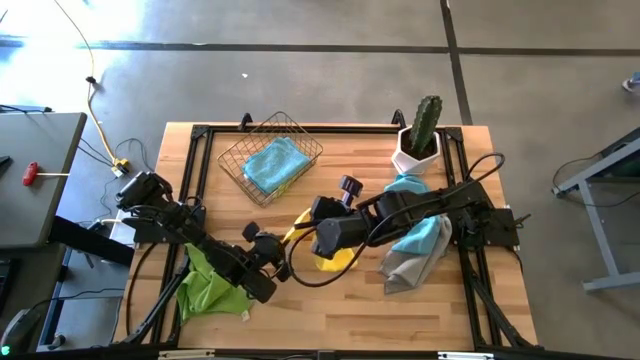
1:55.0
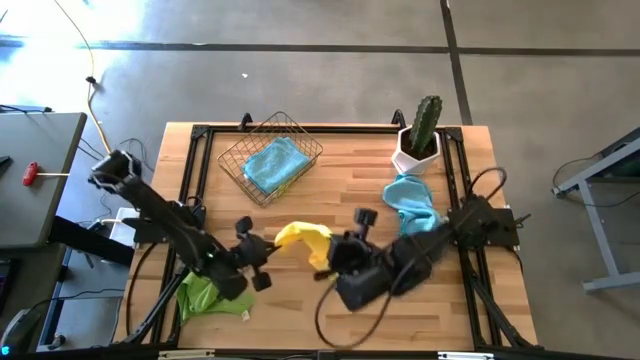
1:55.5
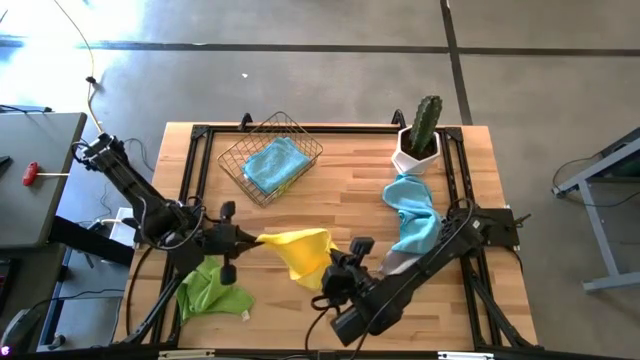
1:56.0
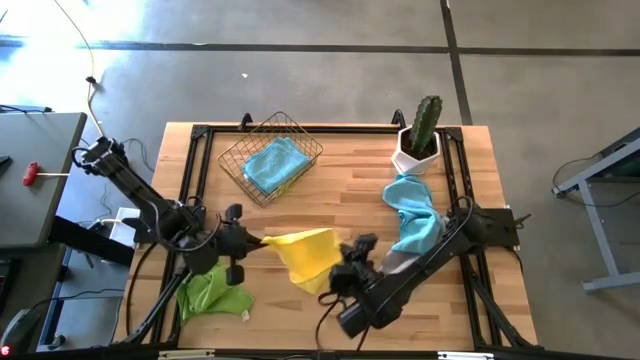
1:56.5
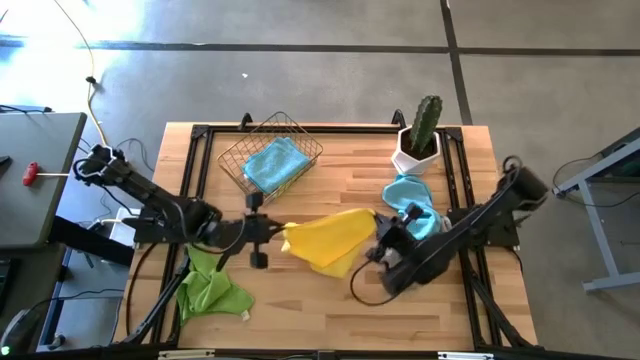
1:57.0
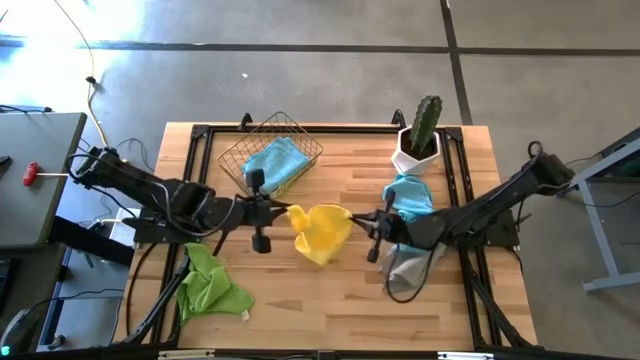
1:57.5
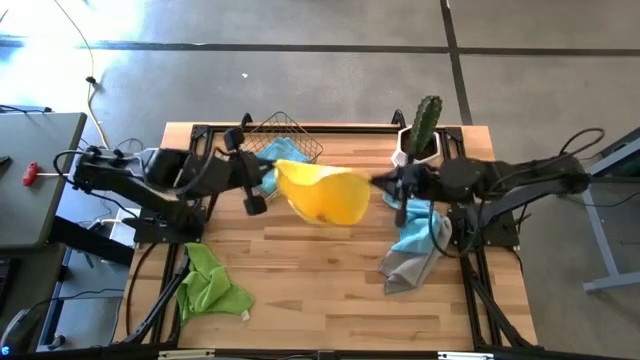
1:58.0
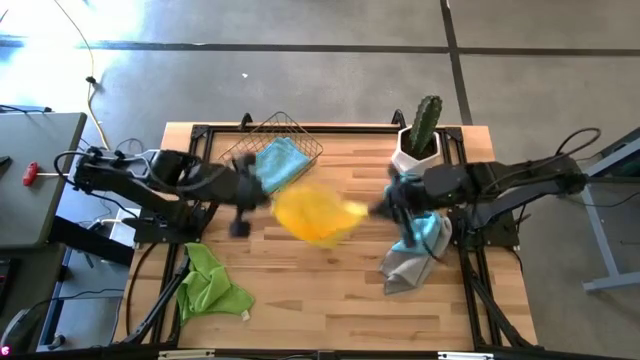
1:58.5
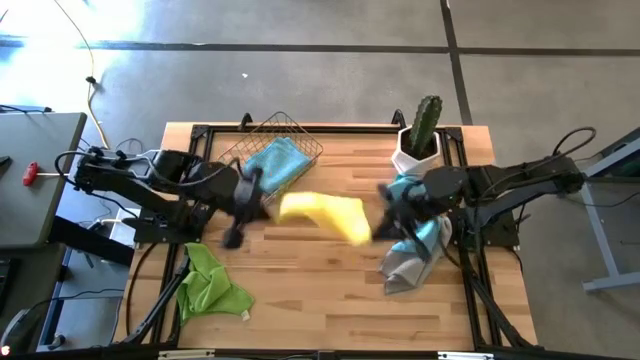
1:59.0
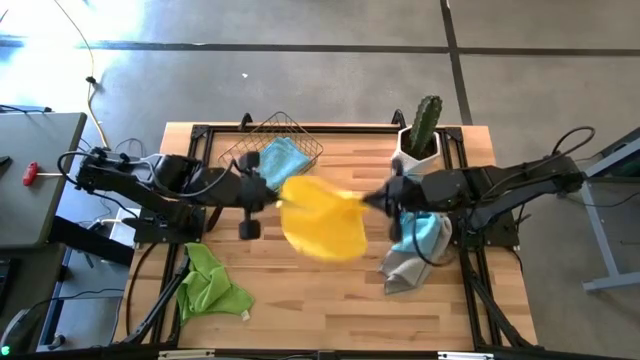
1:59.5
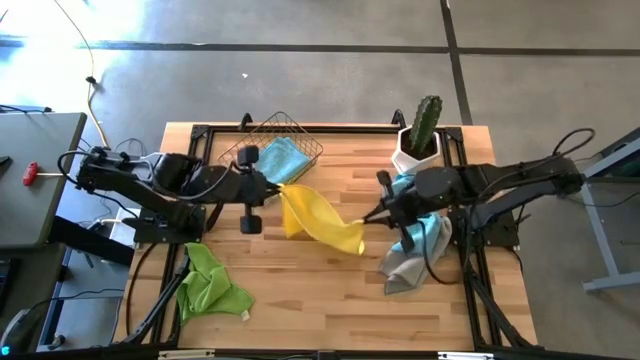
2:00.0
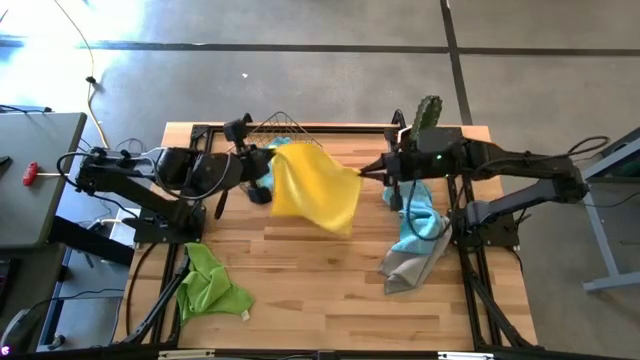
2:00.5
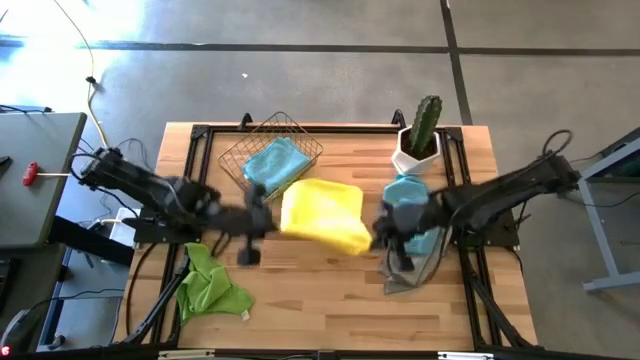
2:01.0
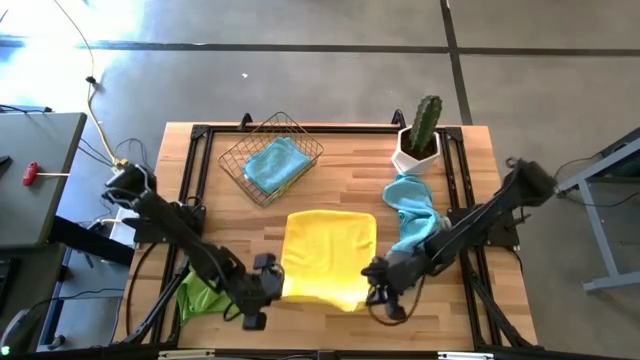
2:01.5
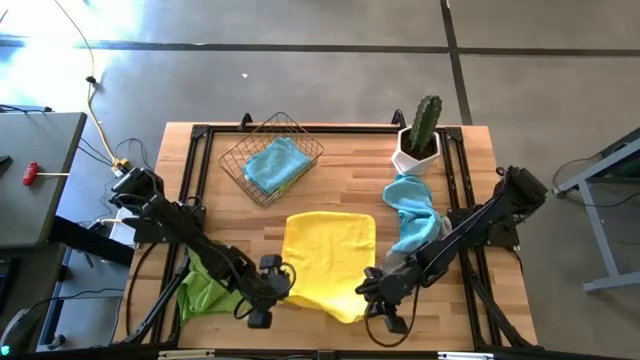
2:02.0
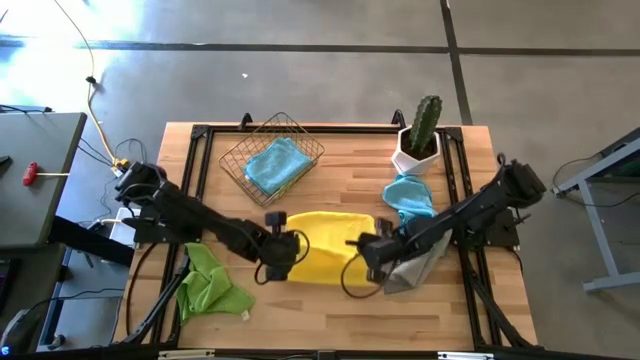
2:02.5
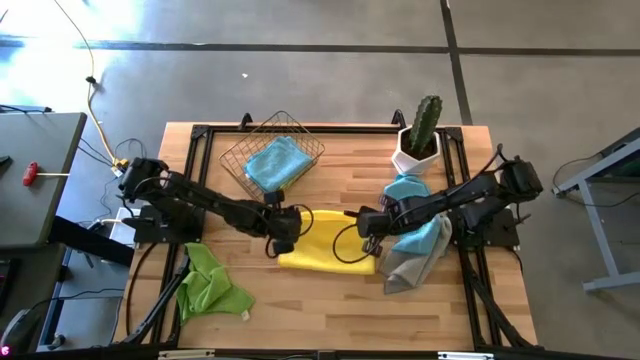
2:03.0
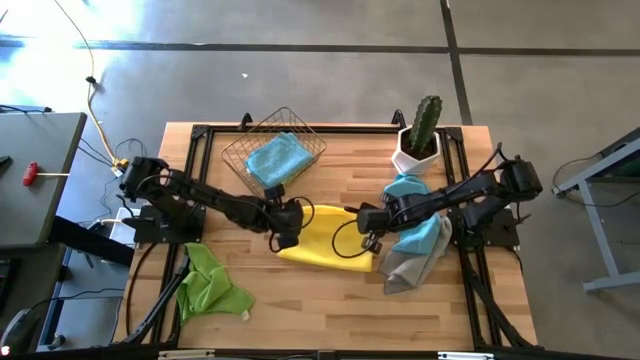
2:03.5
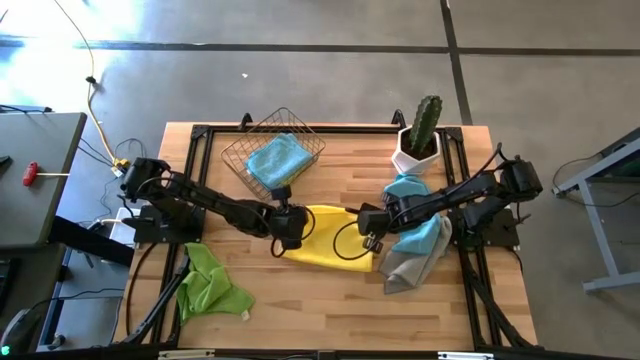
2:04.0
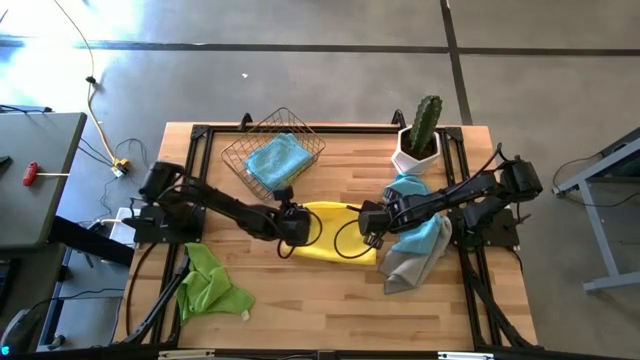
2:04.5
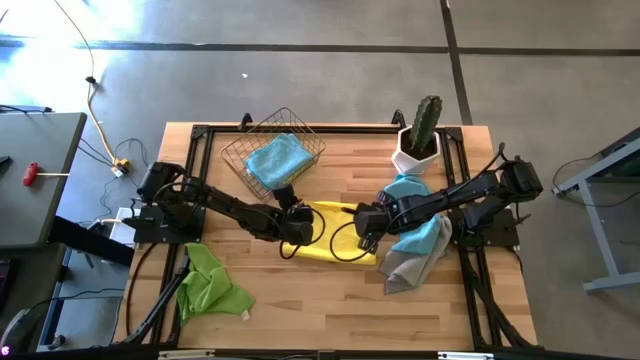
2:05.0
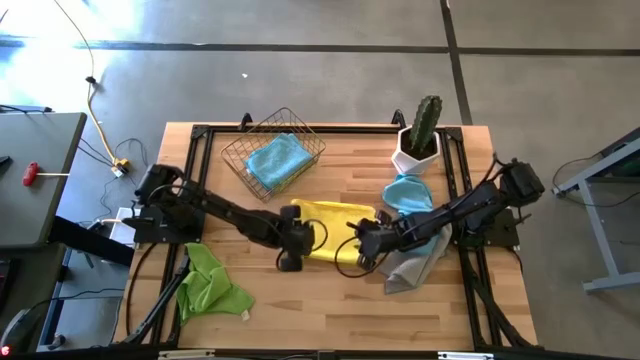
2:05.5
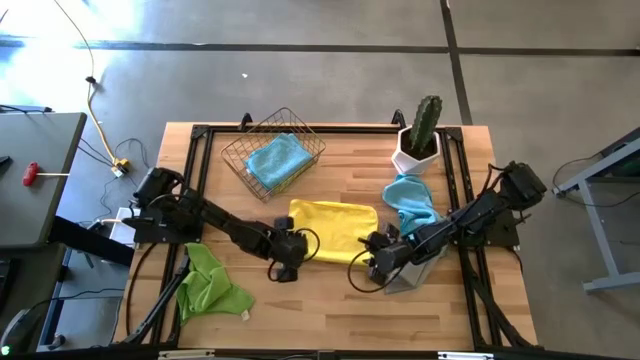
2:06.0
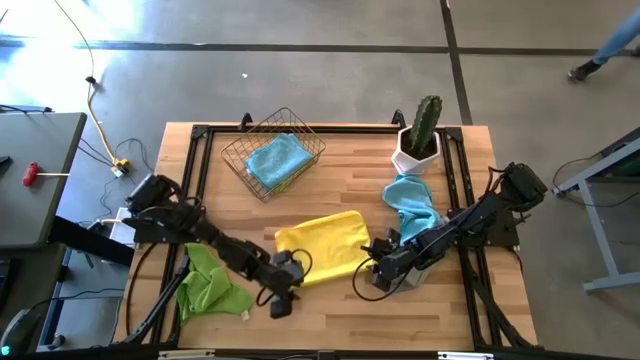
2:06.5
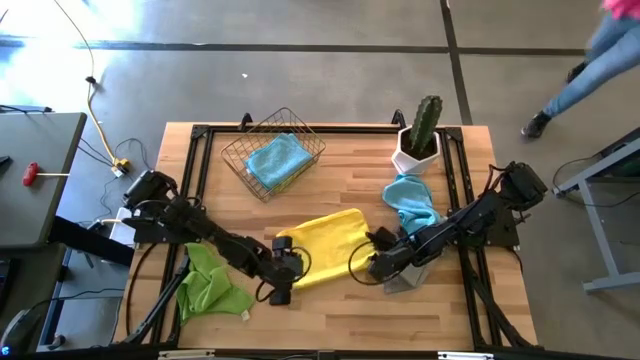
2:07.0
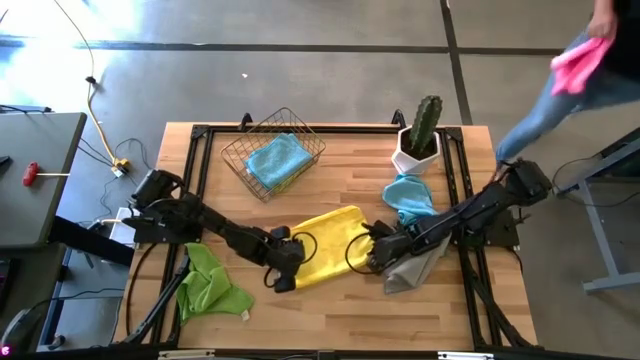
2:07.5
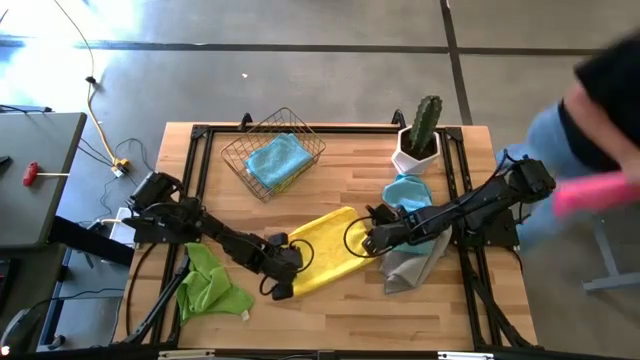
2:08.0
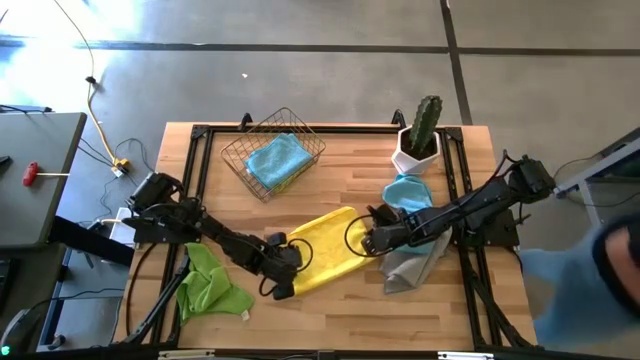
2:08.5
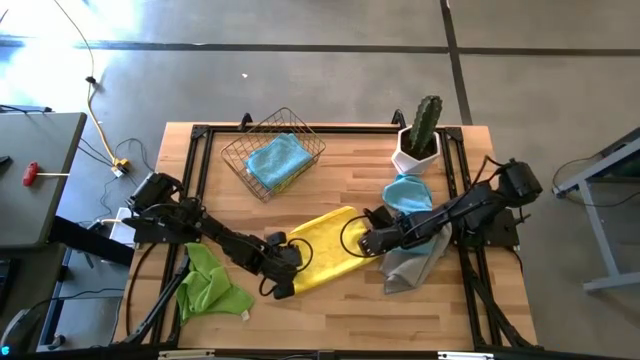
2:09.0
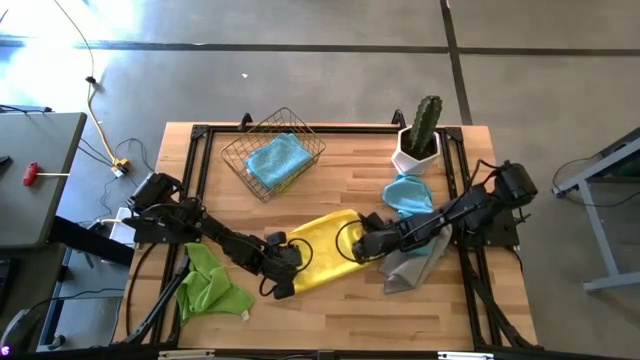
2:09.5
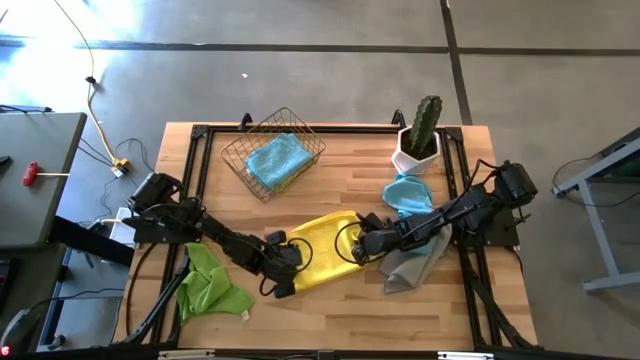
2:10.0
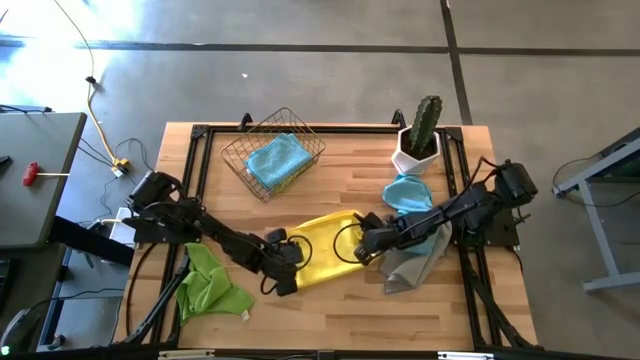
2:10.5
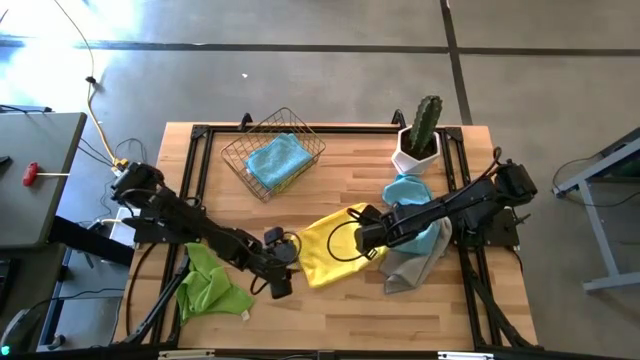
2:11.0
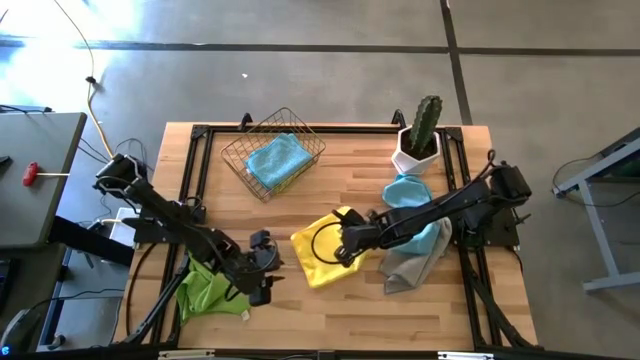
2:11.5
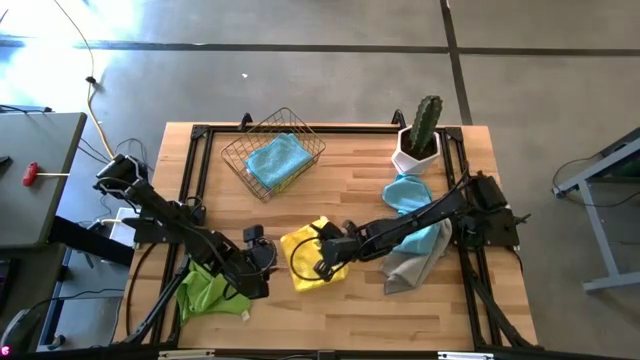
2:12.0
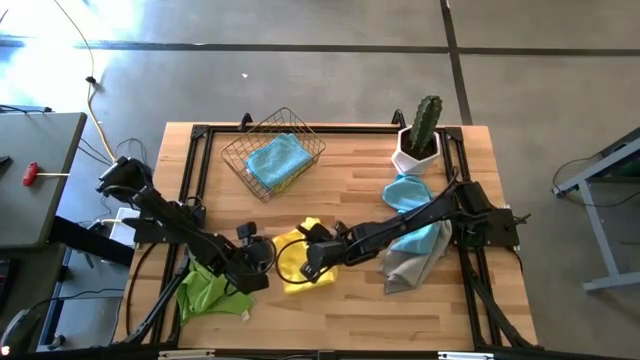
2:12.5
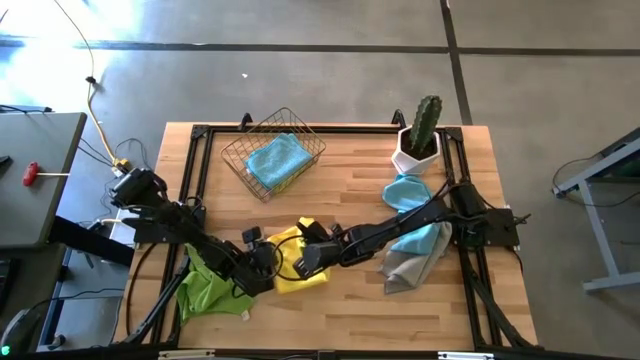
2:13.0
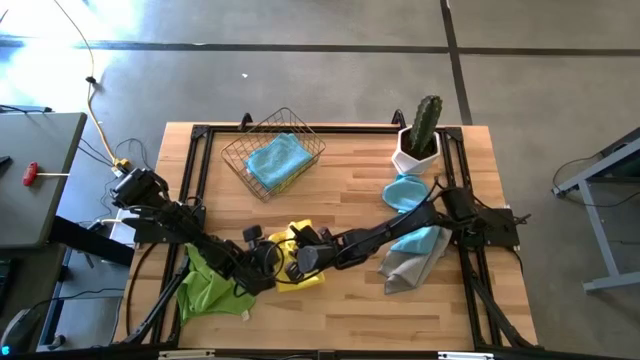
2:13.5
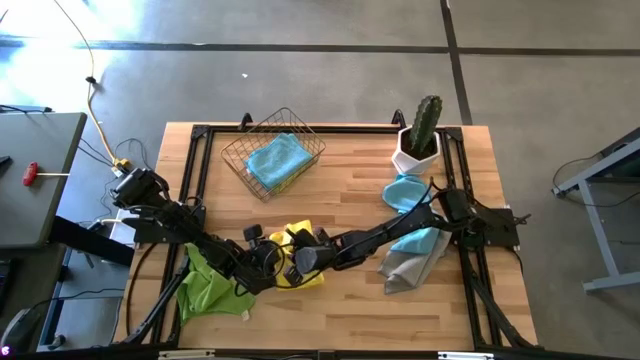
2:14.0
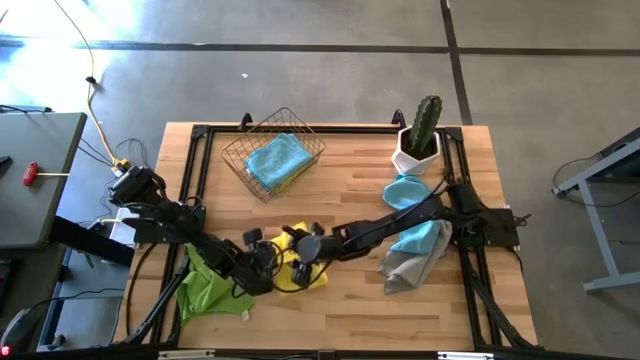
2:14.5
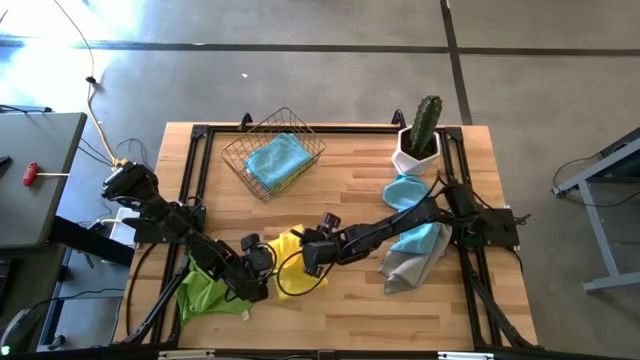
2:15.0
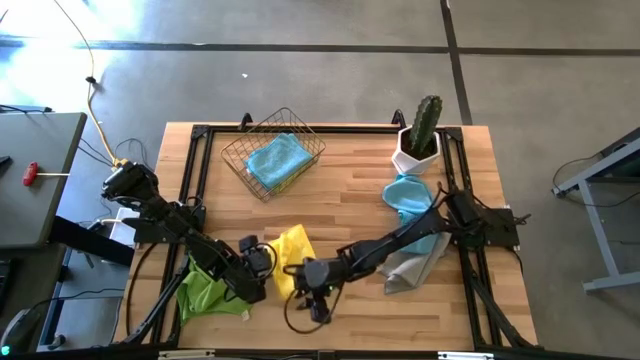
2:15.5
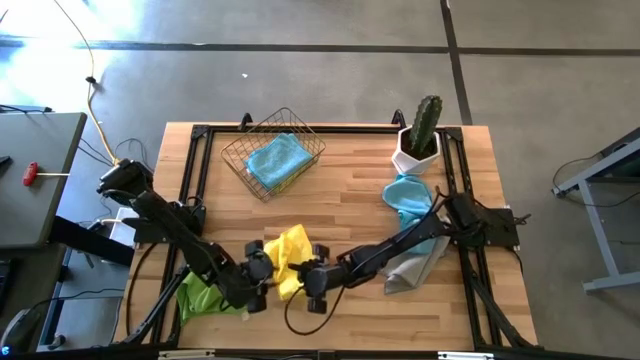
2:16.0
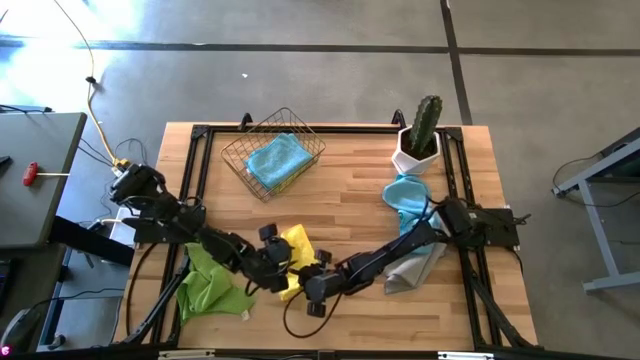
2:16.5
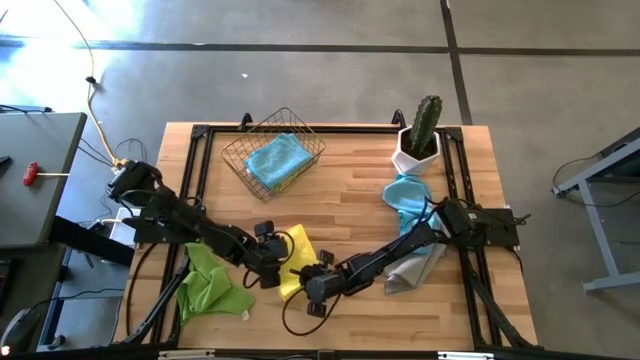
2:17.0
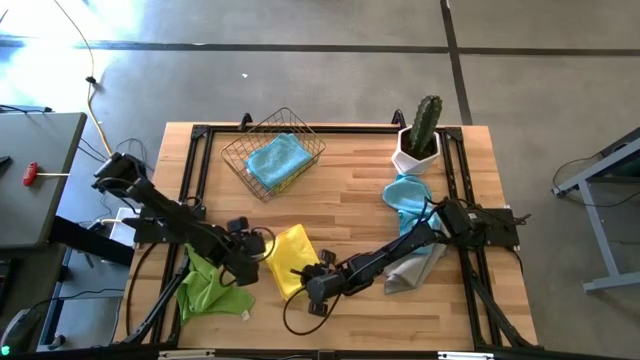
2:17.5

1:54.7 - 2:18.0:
Task: Fold microfiber towels
Fold the yellow microfiber towel
